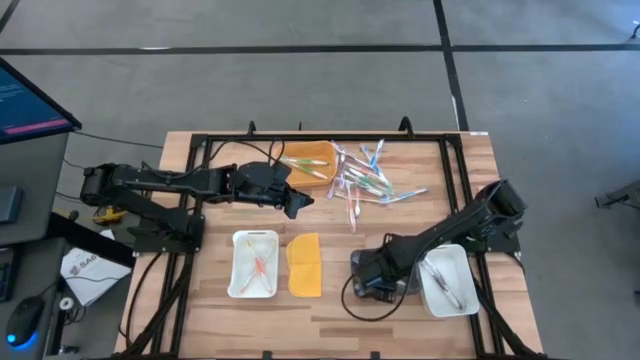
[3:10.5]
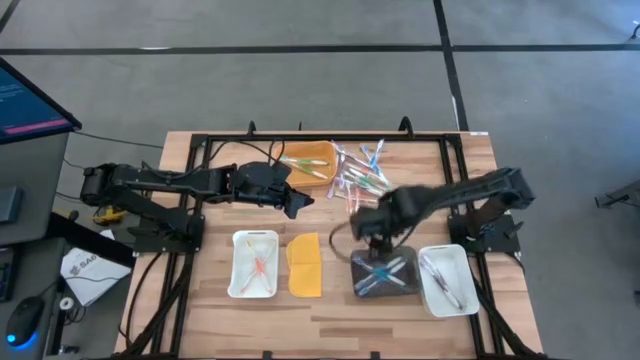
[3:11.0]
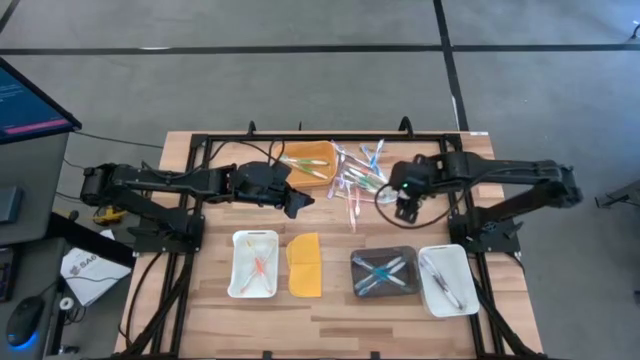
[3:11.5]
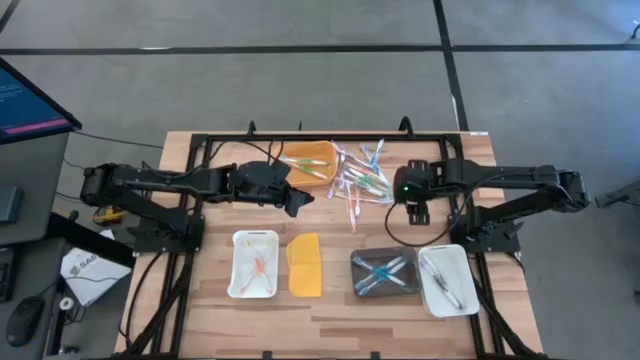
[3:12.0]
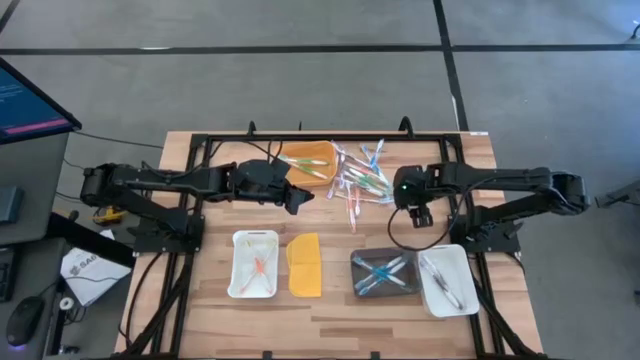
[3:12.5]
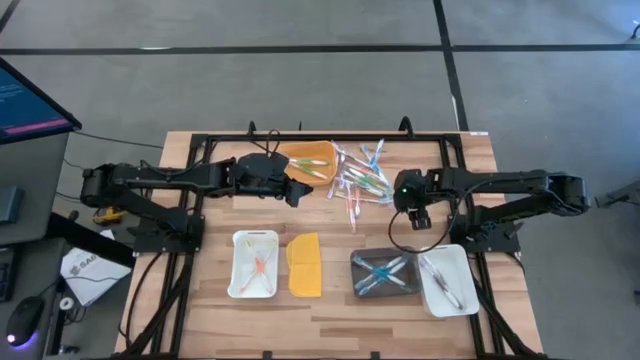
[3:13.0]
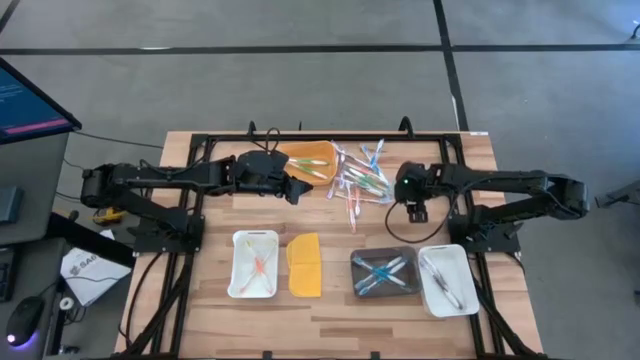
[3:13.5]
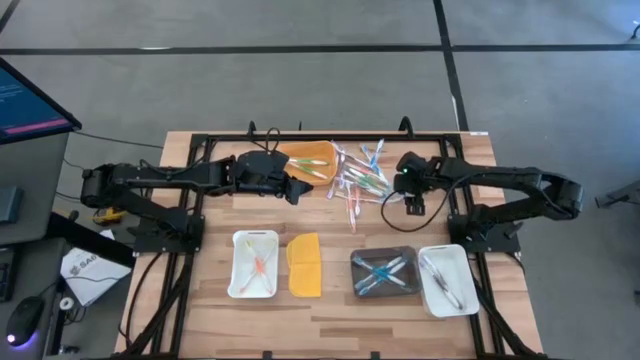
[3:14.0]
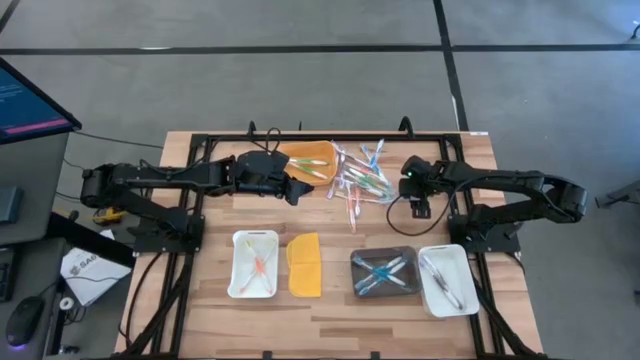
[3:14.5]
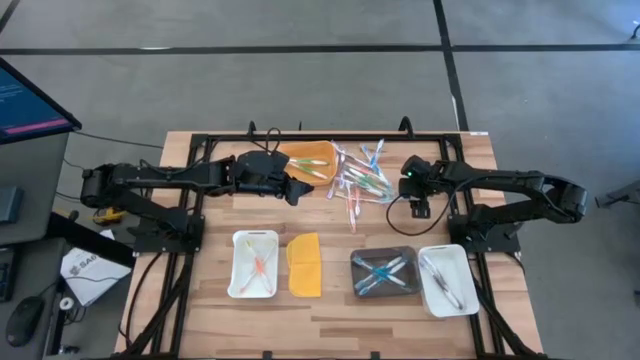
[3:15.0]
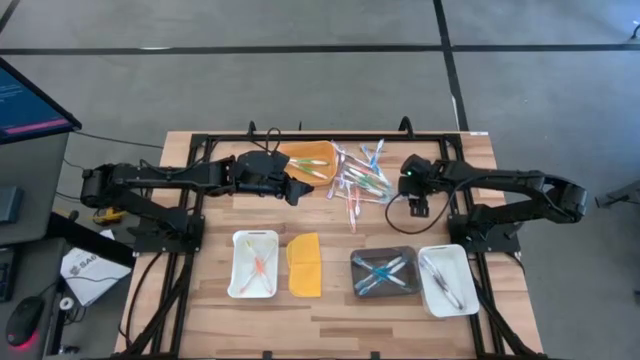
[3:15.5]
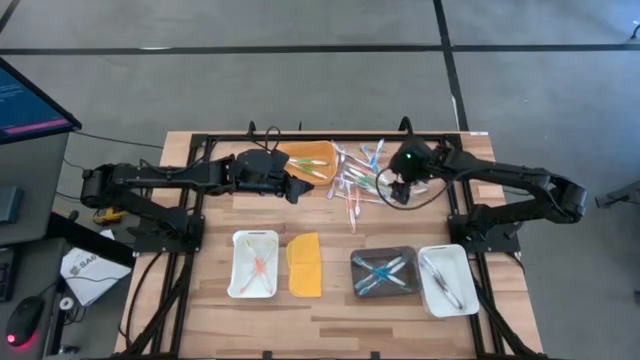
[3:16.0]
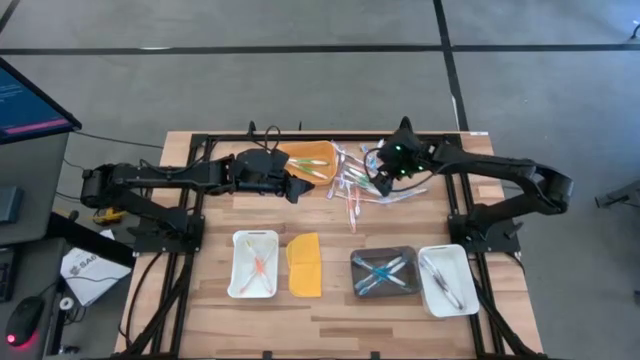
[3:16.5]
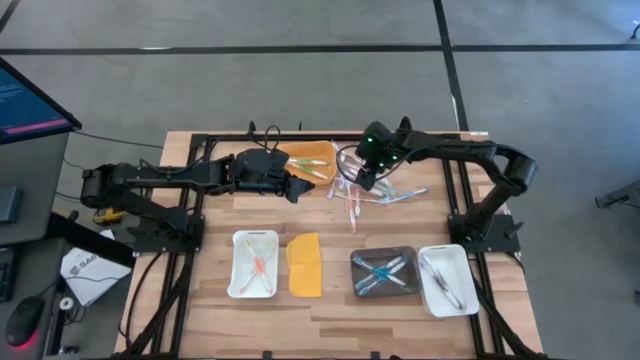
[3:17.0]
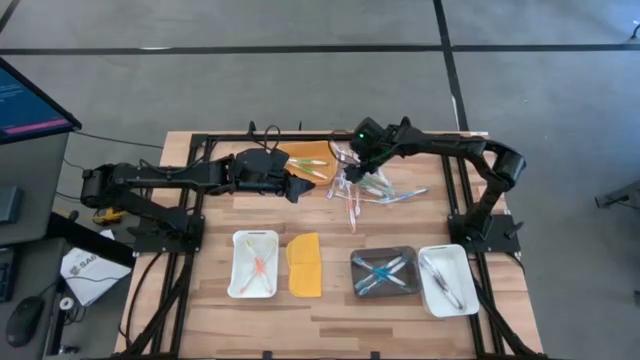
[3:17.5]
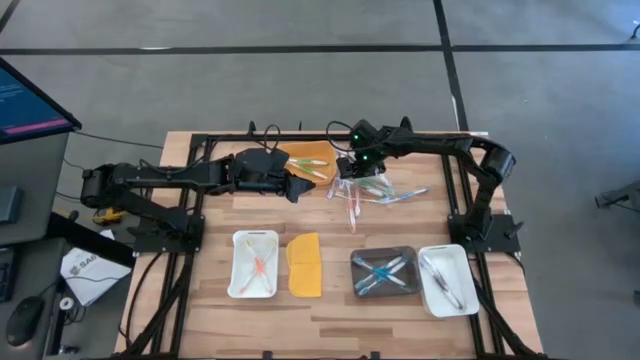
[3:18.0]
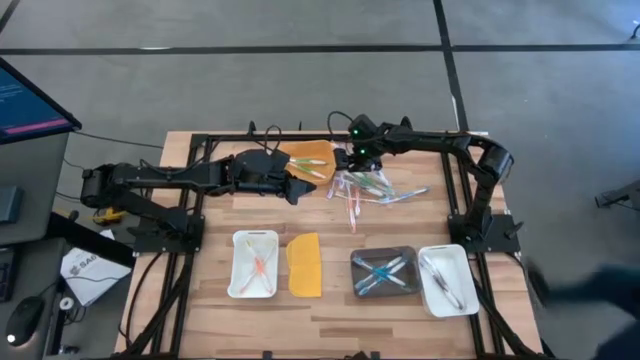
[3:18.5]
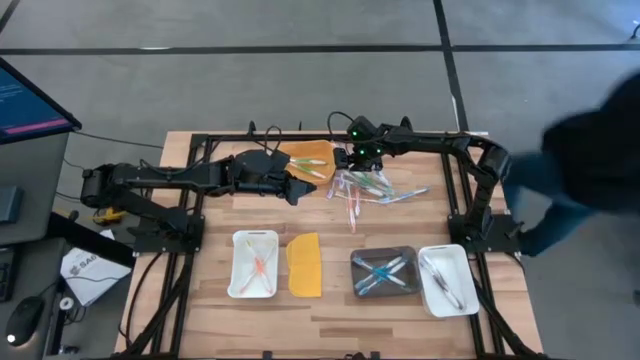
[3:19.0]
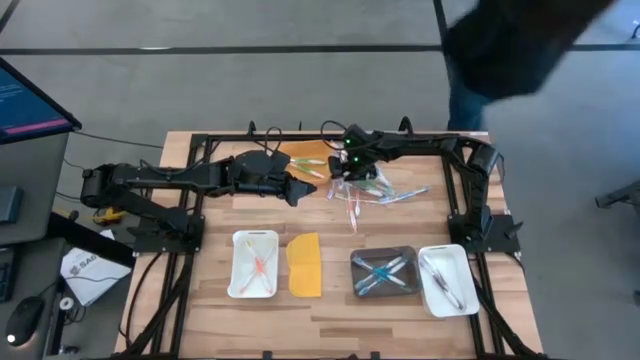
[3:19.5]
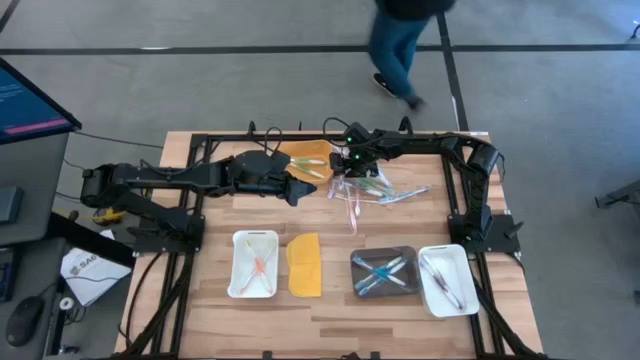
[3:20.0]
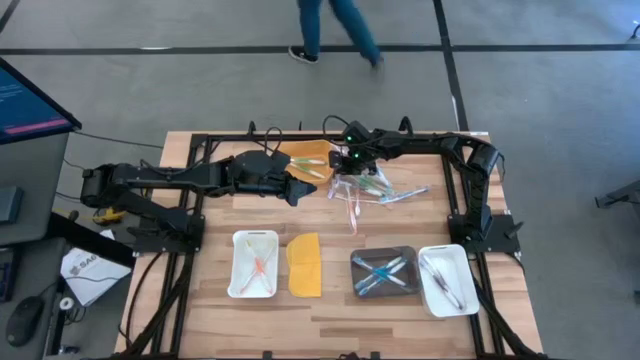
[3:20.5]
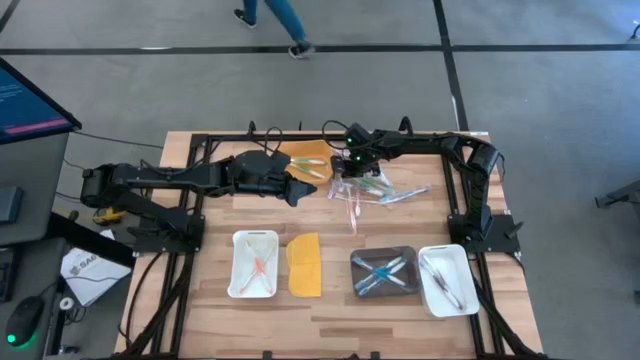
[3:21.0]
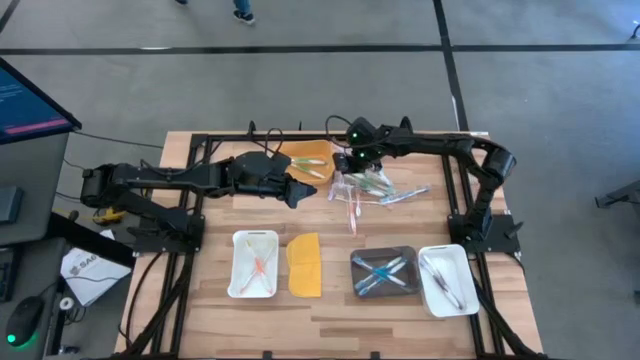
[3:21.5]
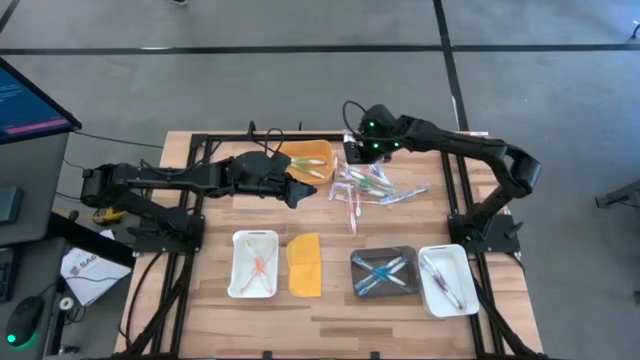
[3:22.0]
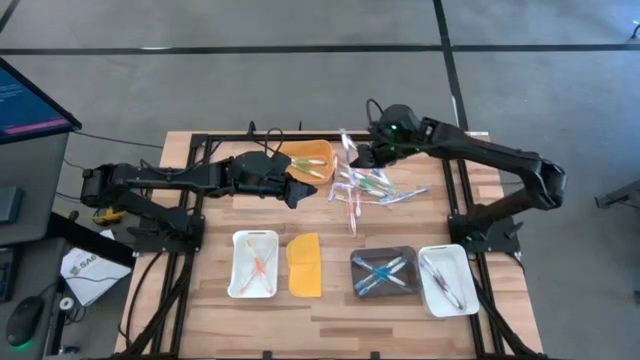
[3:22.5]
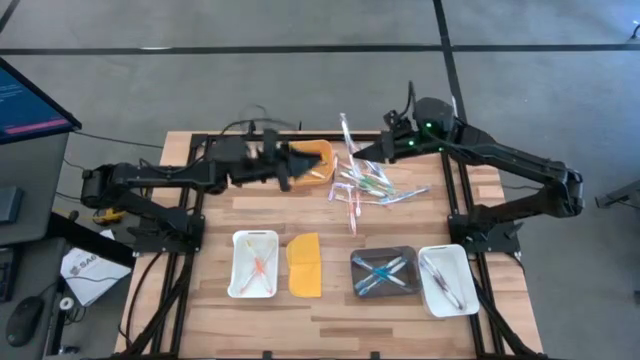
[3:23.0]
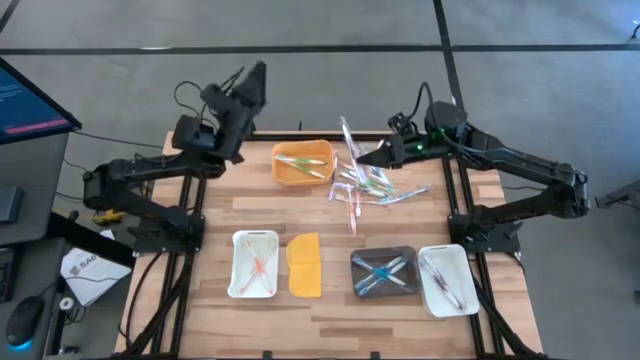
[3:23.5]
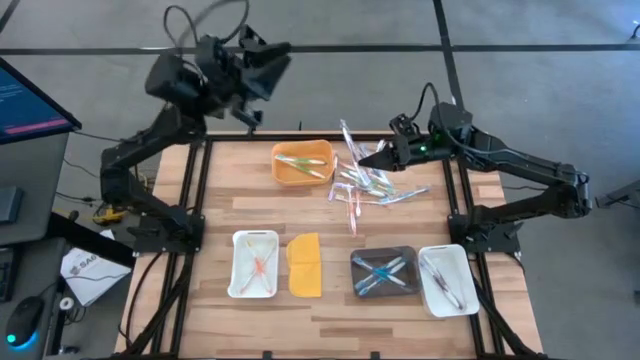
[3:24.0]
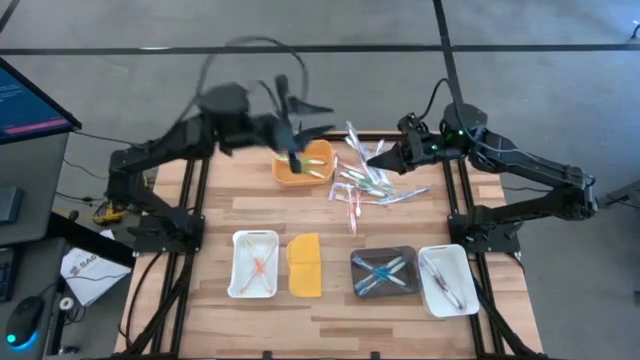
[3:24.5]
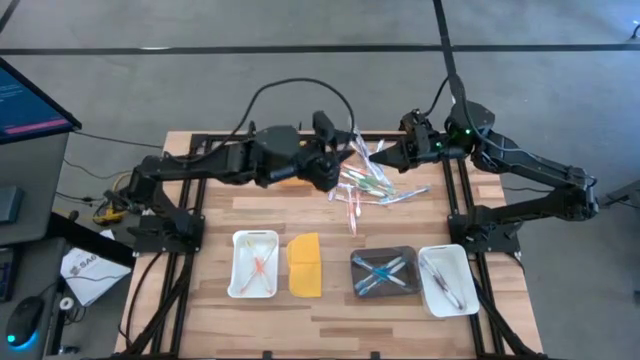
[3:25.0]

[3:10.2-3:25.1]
Task: Pick & Place Toothbrushes
Put the purple toothbrush into the right white bin

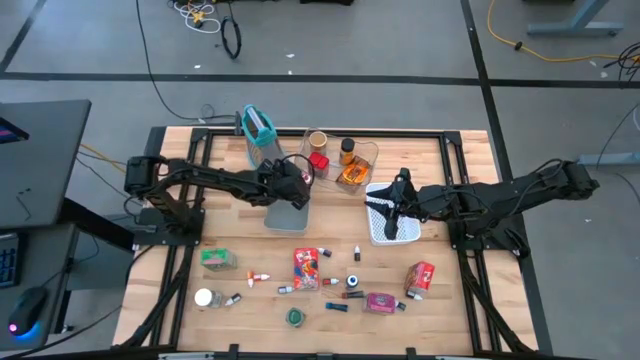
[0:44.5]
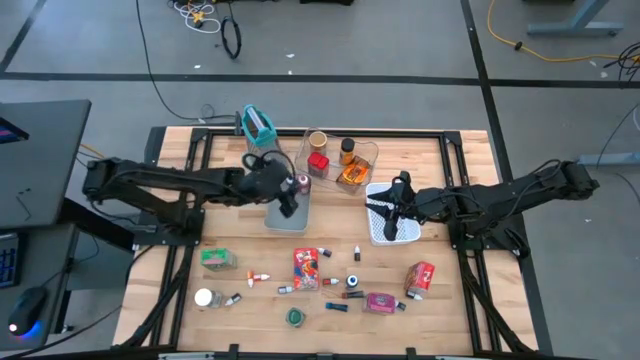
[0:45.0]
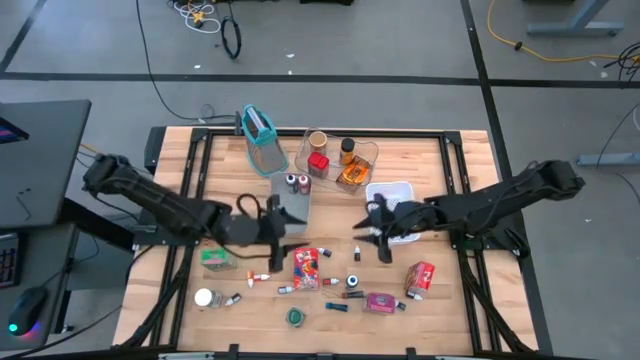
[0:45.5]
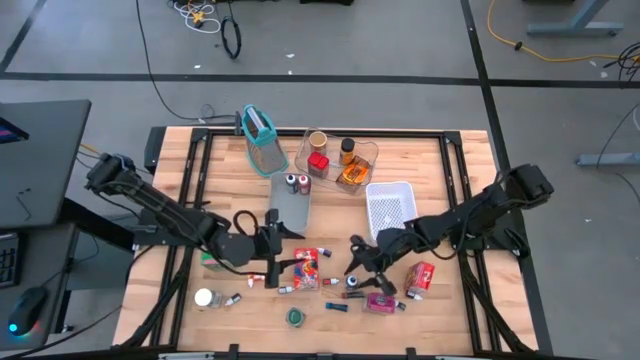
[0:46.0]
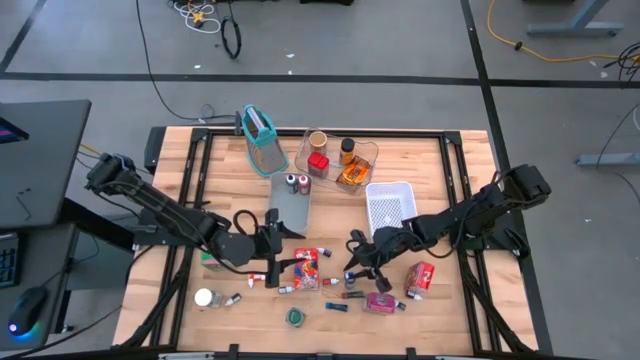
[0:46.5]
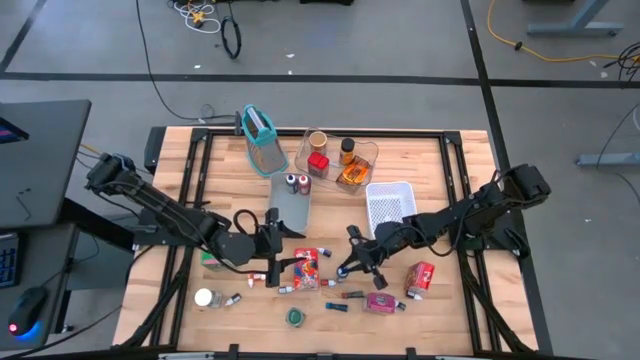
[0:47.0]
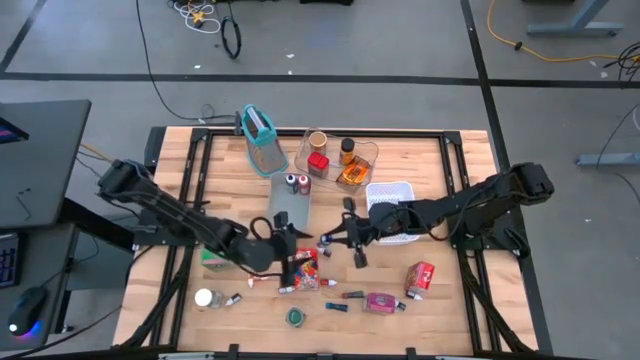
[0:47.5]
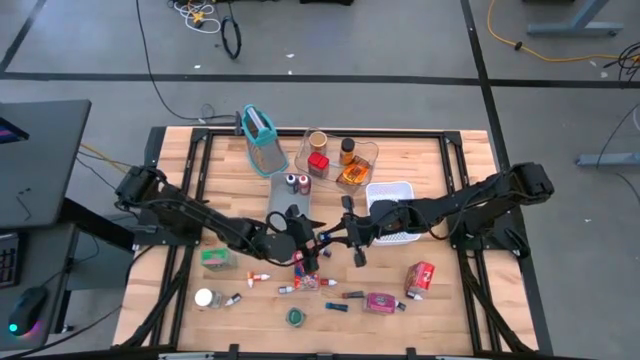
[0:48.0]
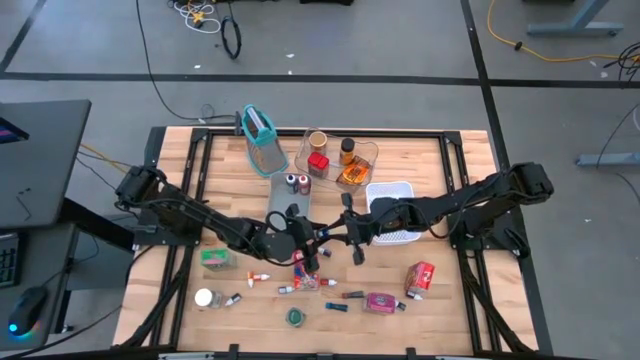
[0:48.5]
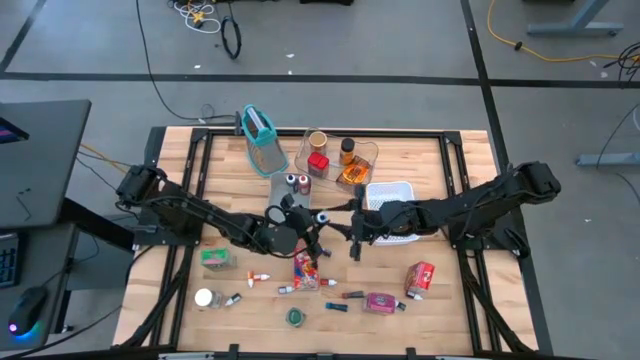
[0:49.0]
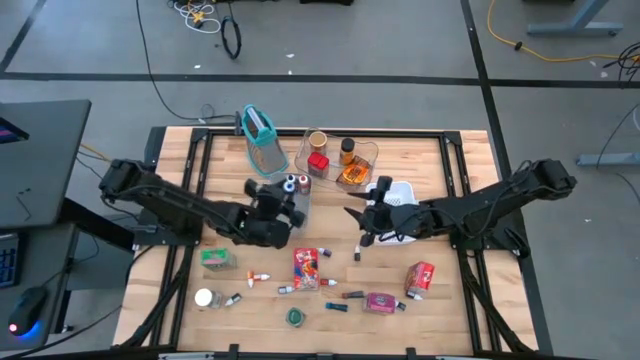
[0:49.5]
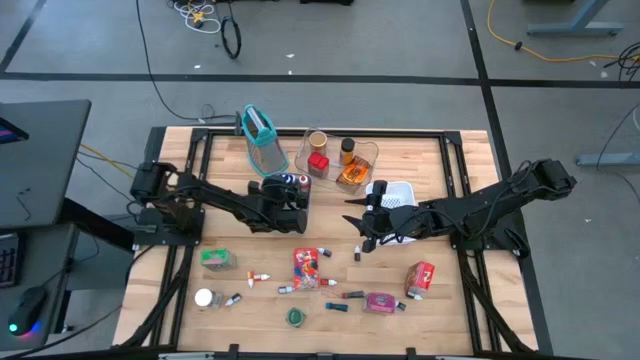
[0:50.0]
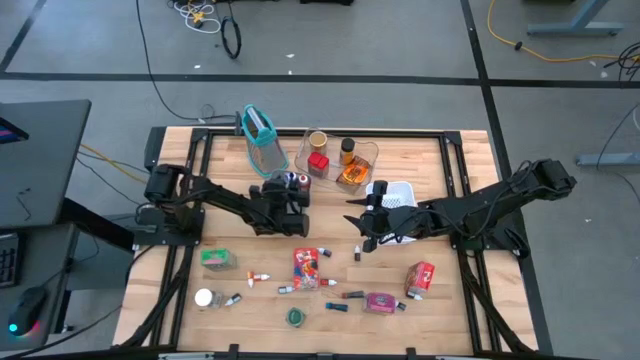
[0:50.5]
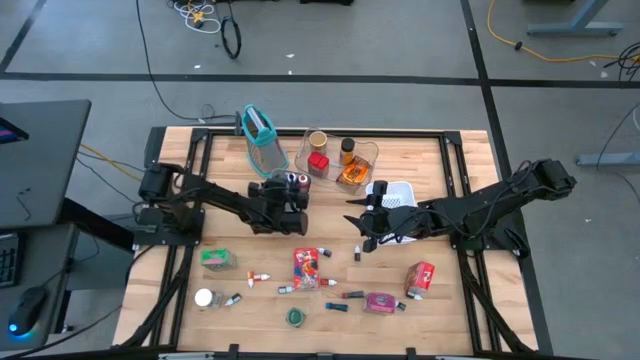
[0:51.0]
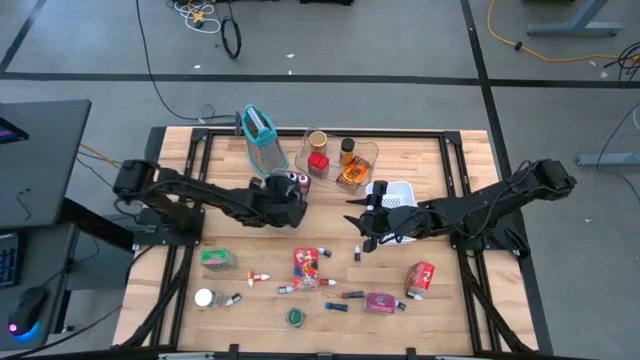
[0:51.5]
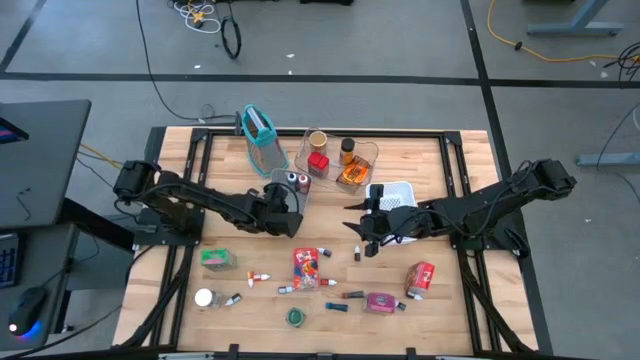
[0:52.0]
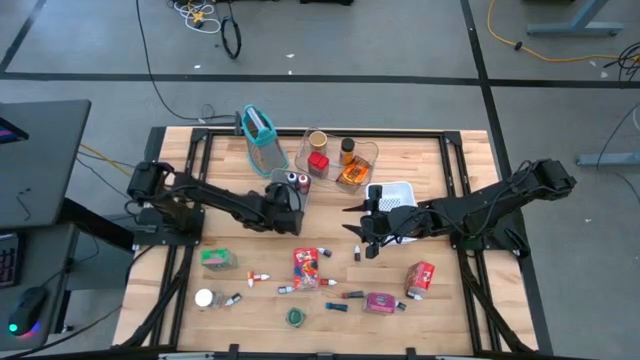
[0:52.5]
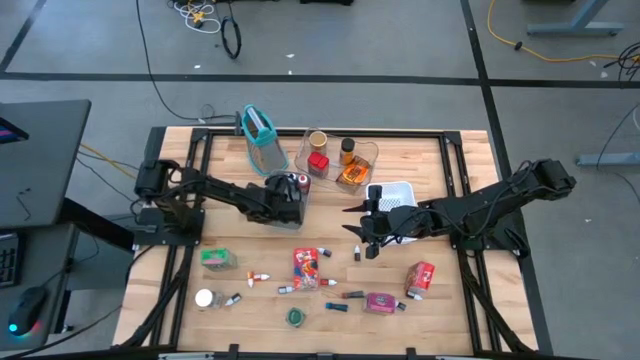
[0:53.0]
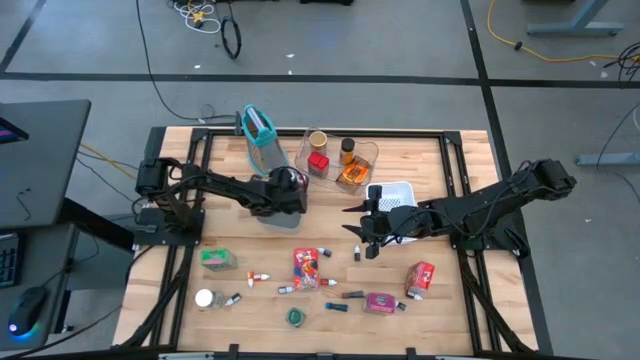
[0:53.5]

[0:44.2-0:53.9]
Task: Pick & Place Kitchen Items
Put the large blue food coloring bottle into the gray bin
